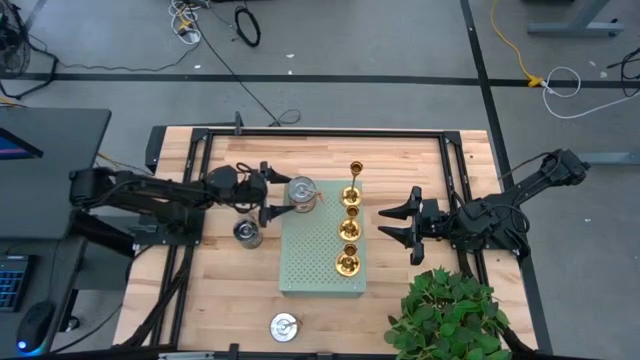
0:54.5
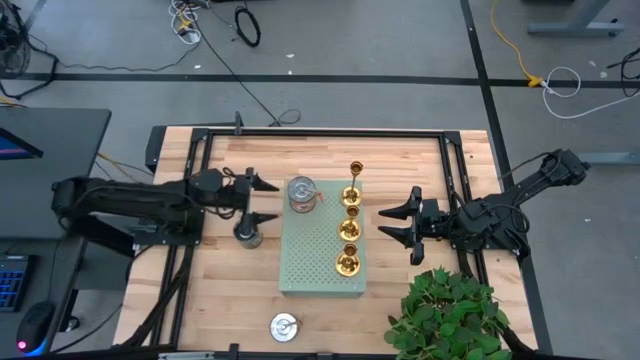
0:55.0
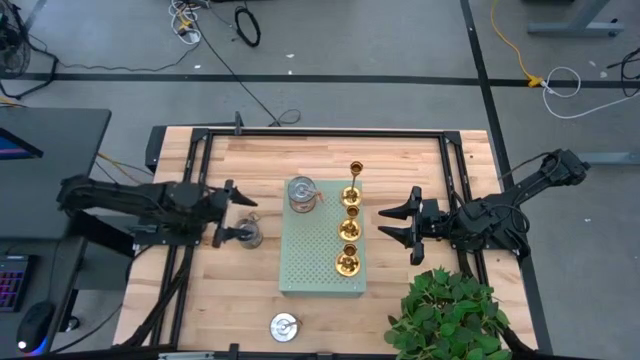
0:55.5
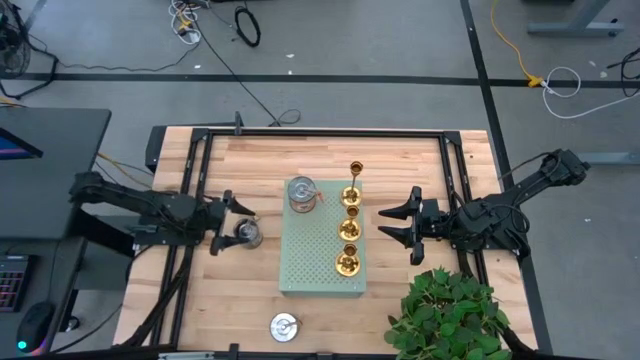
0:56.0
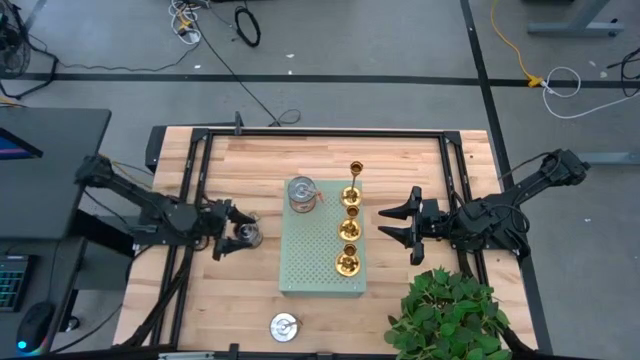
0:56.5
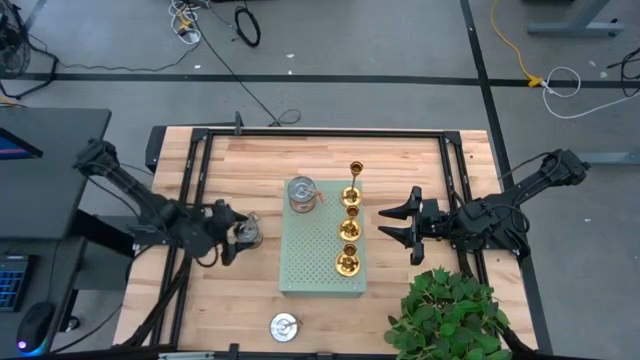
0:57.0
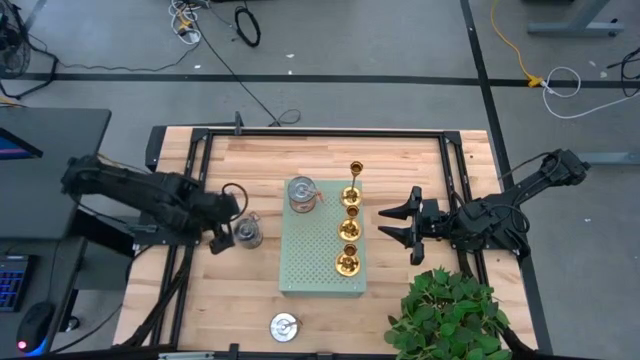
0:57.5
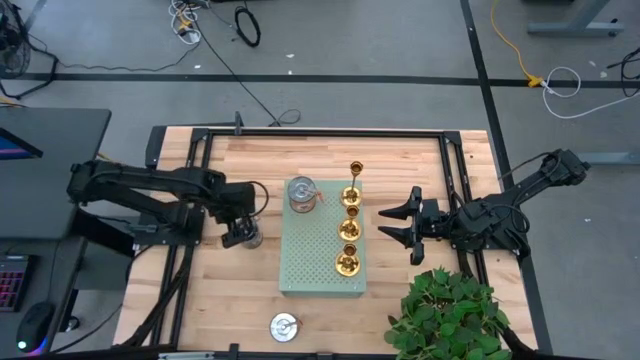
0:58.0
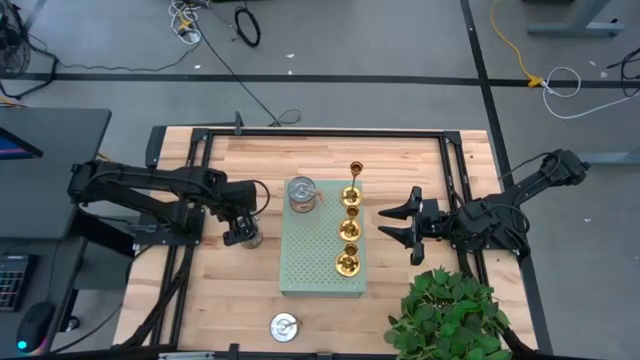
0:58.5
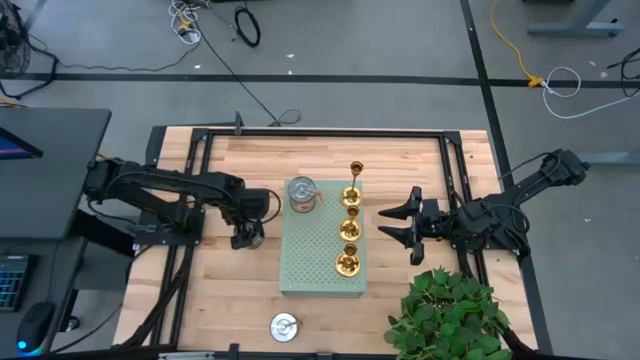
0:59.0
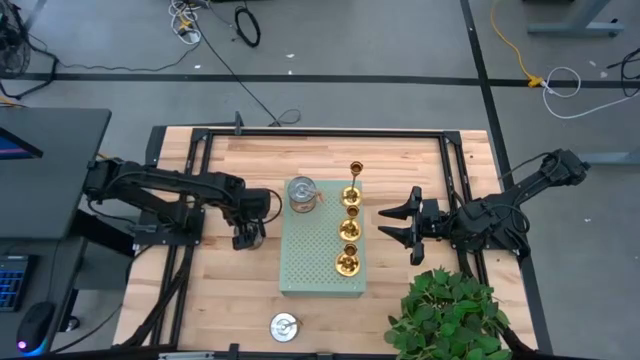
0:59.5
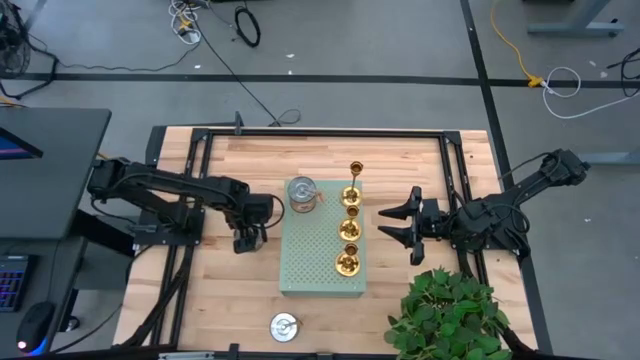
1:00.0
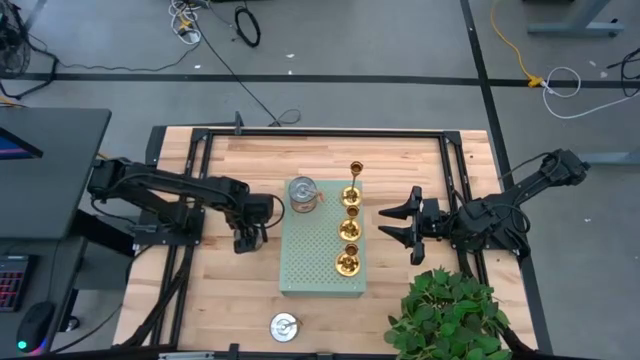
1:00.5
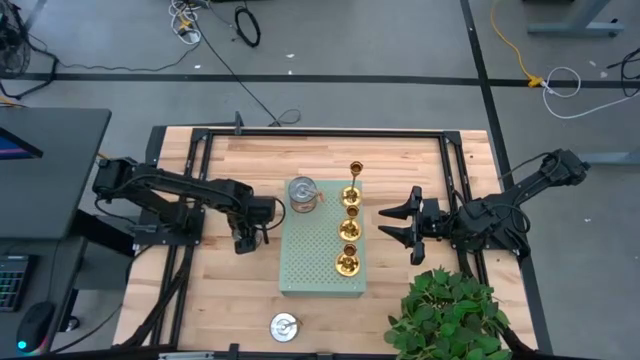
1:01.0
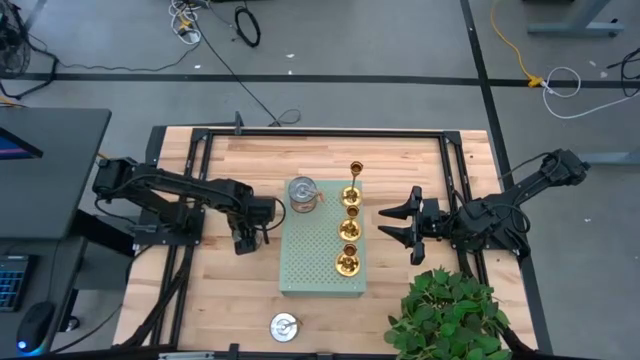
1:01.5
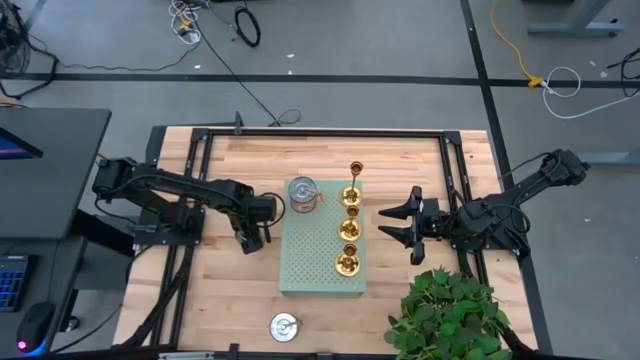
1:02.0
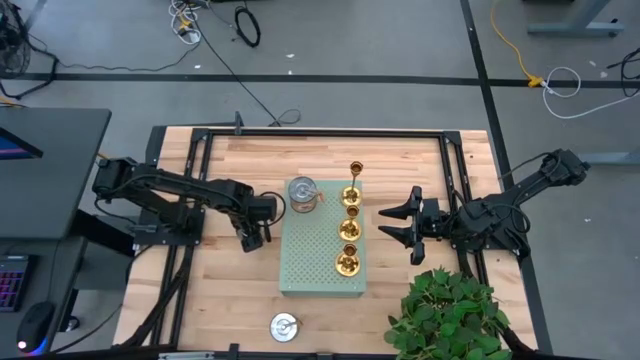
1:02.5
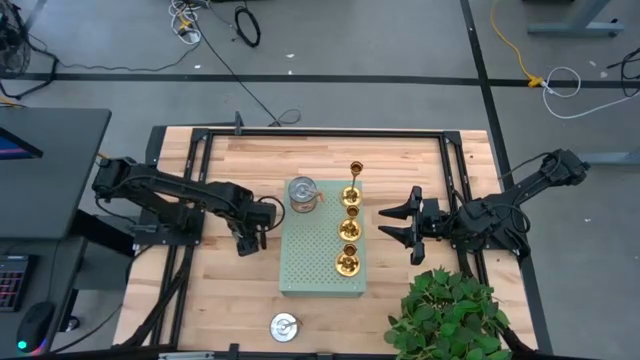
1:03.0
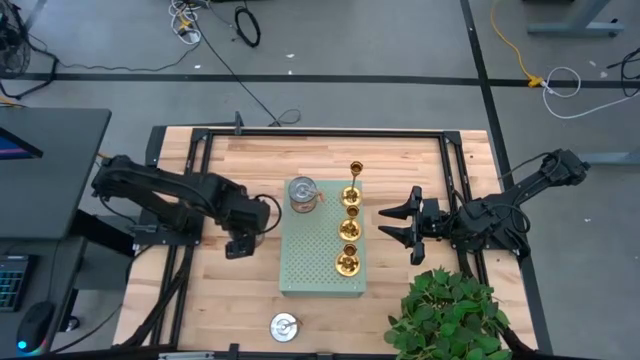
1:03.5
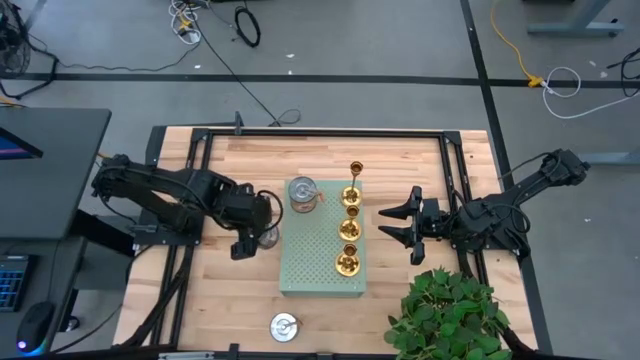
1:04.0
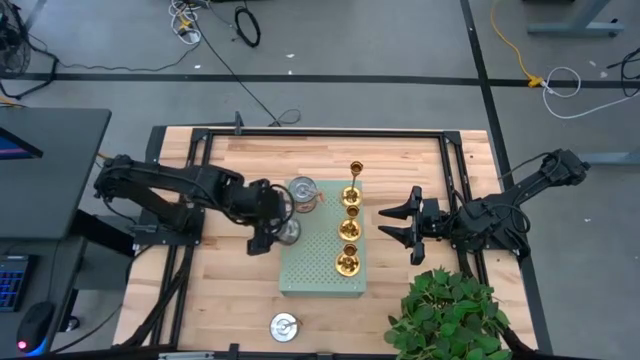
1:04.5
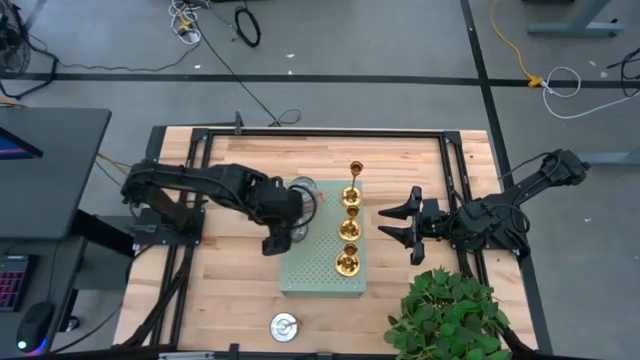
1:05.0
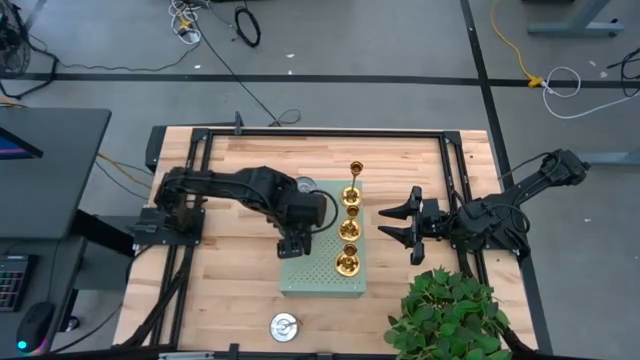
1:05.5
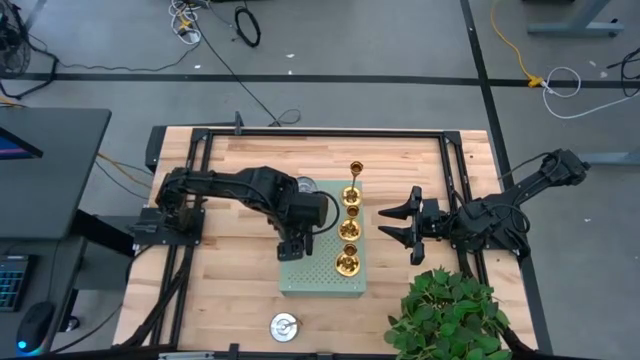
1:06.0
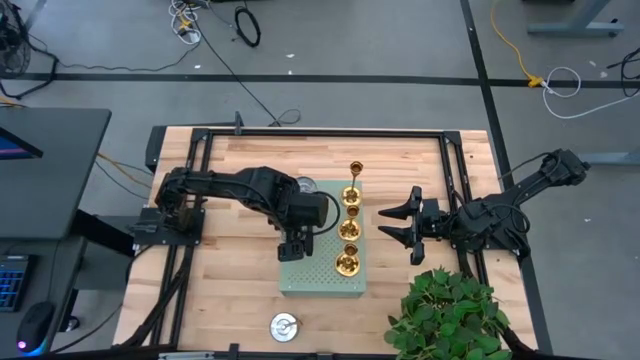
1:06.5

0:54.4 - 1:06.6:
Task: Pick & Place candle stick holders
Put the brown scented candle on the shelf

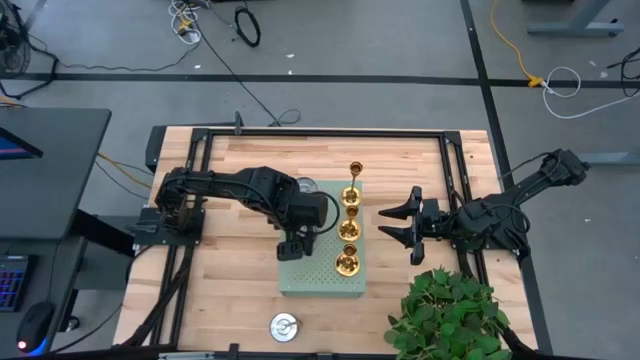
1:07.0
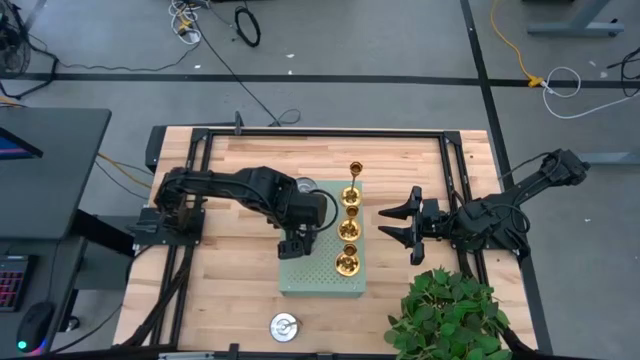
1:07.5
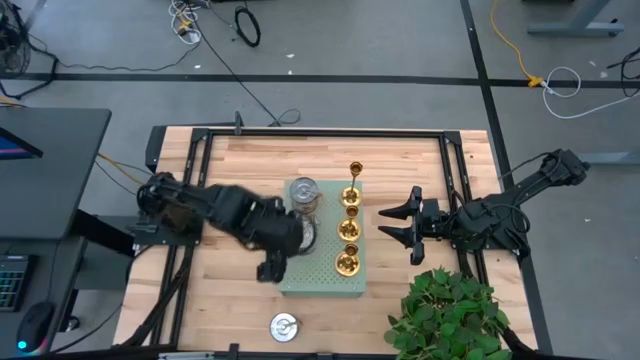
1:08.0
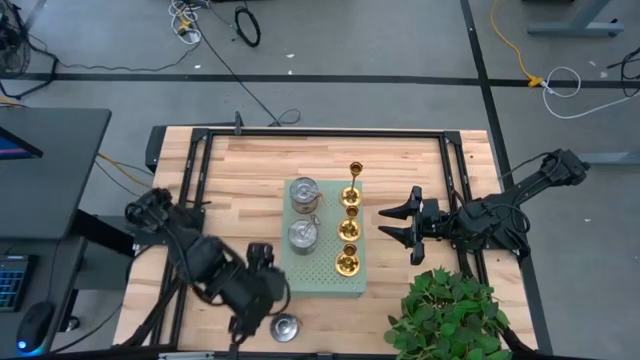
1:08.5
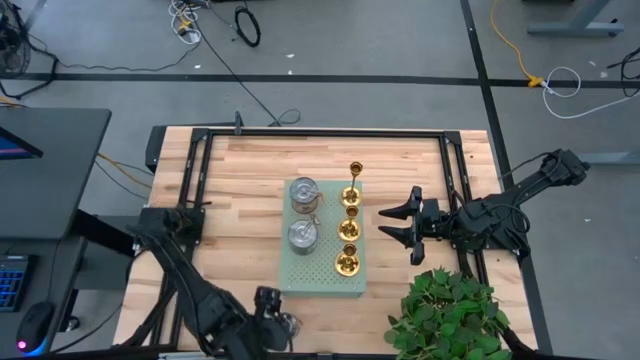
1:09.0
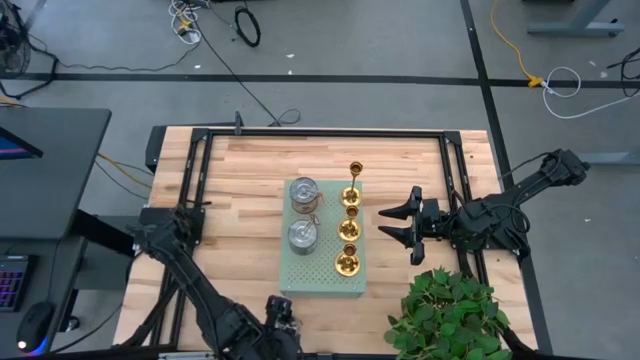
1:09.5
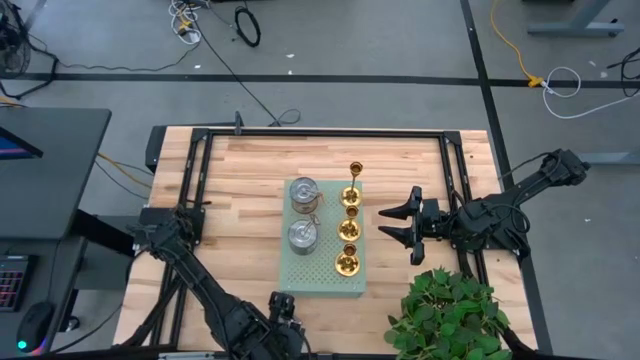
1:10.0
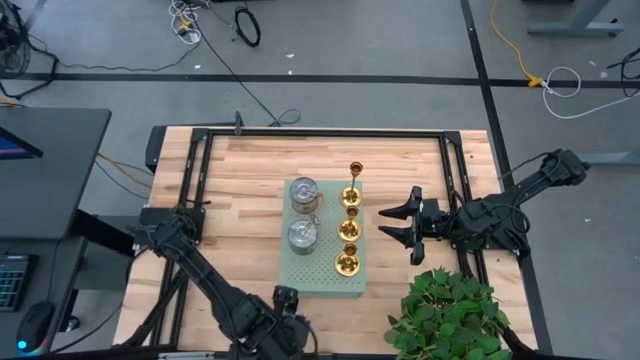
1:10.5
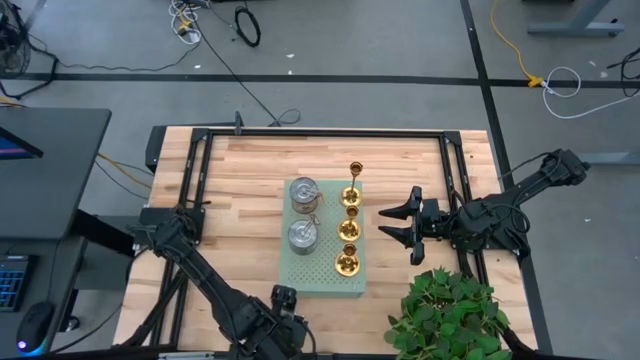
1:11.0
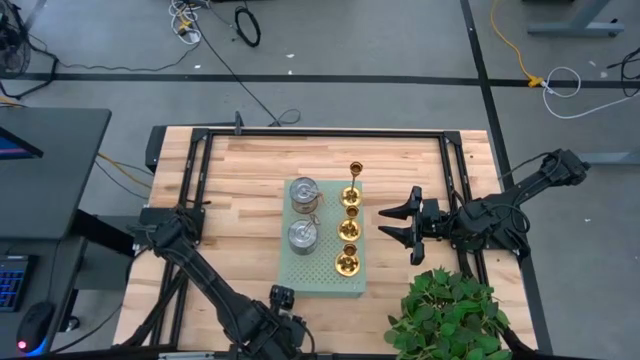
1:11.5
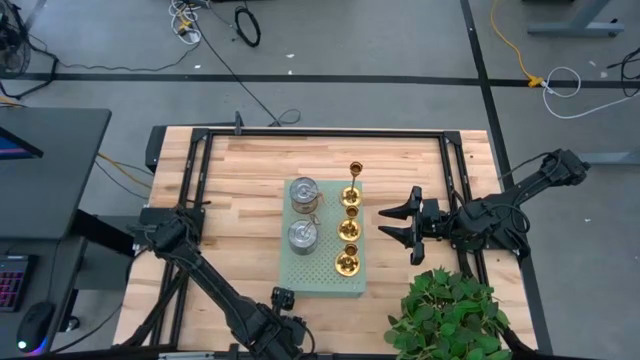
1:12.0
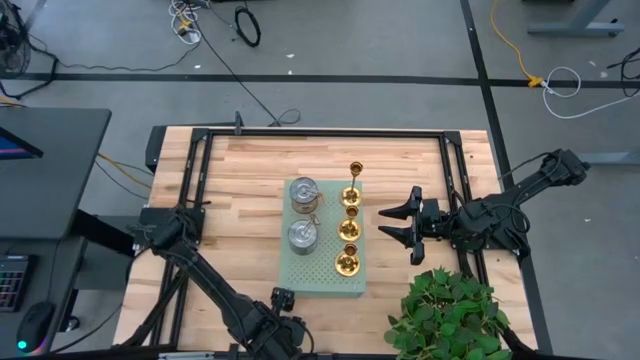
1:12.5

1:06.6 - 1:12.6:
Put the orange scented candle on the shelf

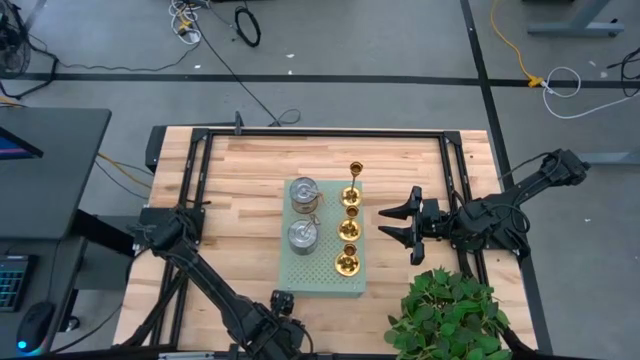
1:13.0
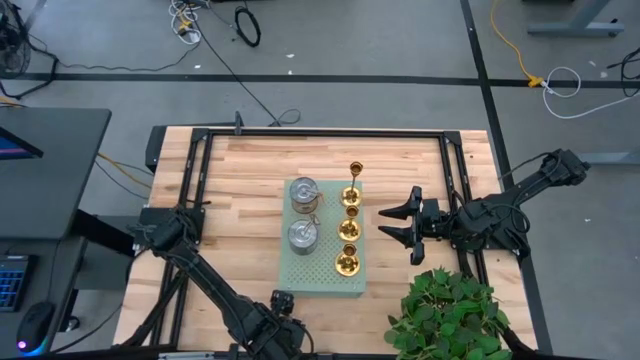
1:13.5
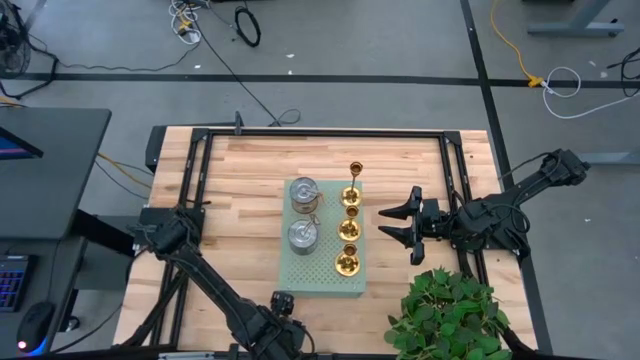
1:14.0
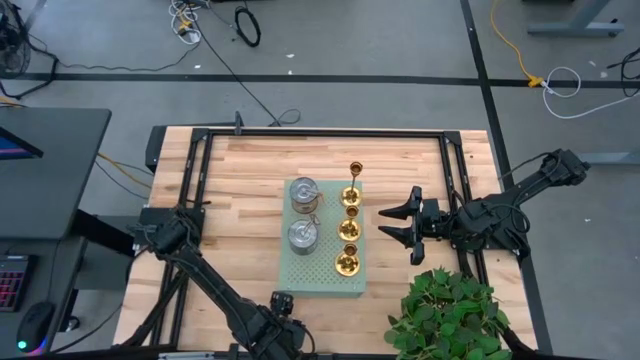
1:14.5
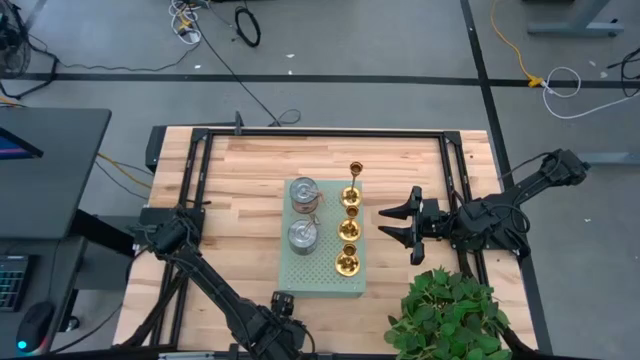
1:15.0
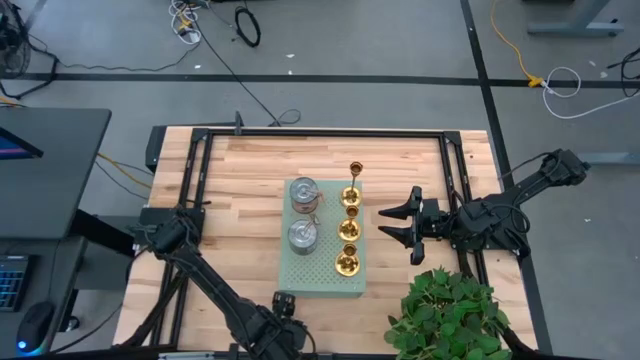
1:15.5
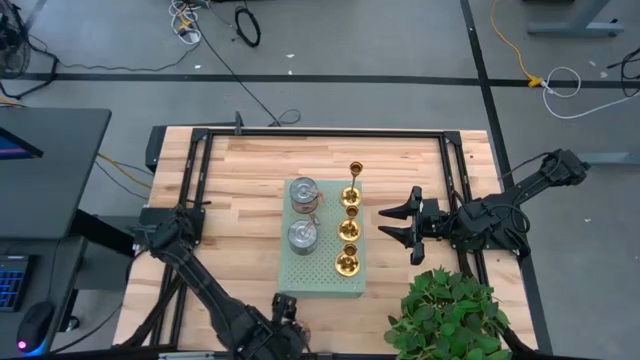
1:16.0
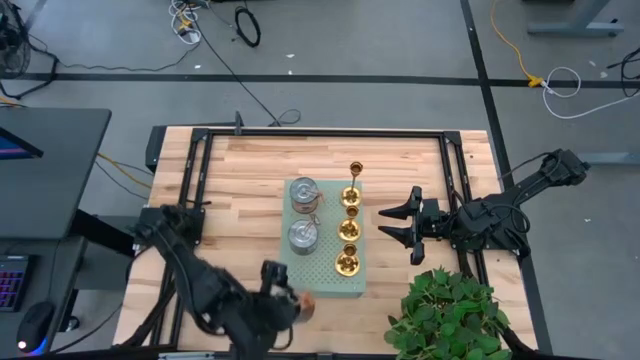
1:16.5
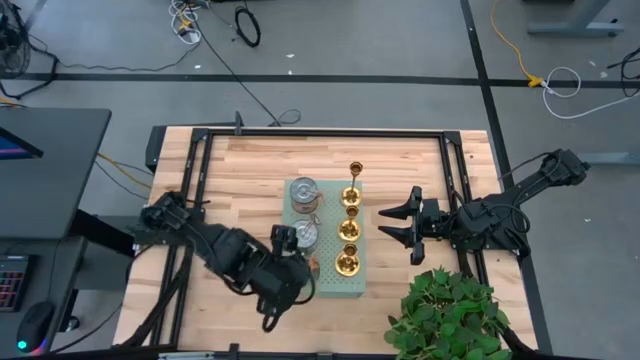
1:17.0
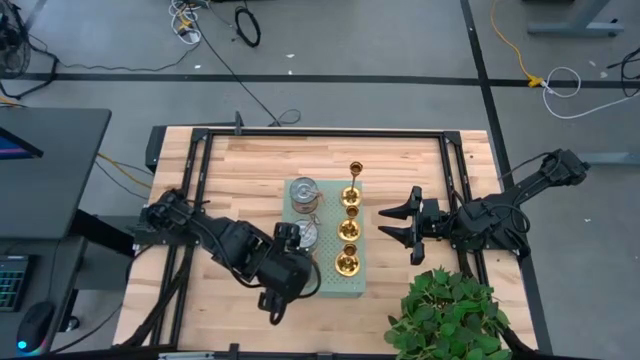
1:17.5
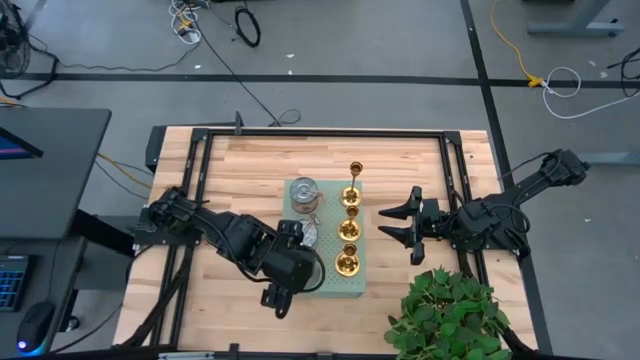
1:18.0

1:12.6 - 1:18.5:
Put the orange scented candle on the shelf
